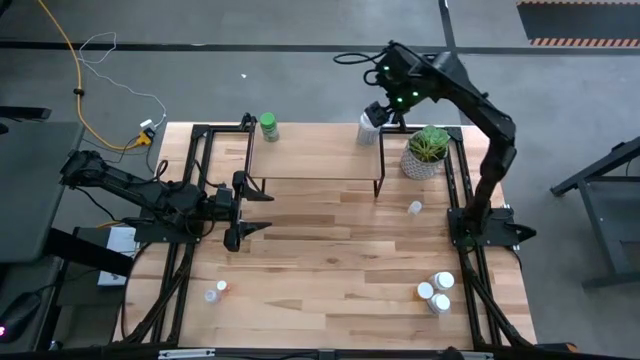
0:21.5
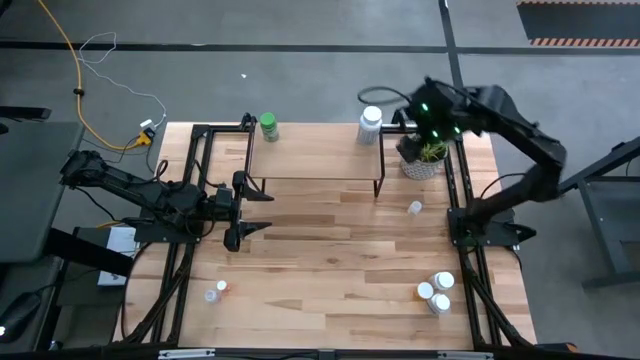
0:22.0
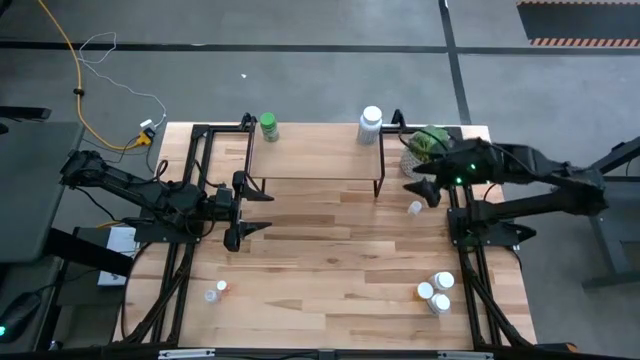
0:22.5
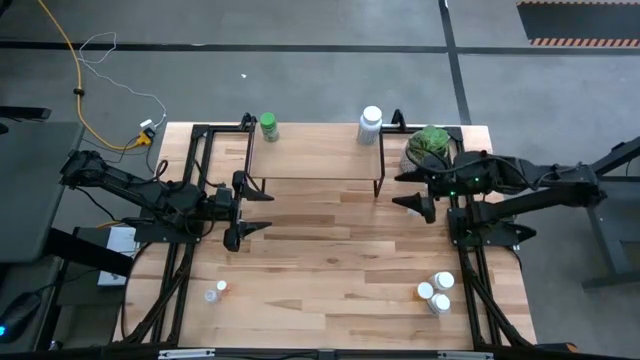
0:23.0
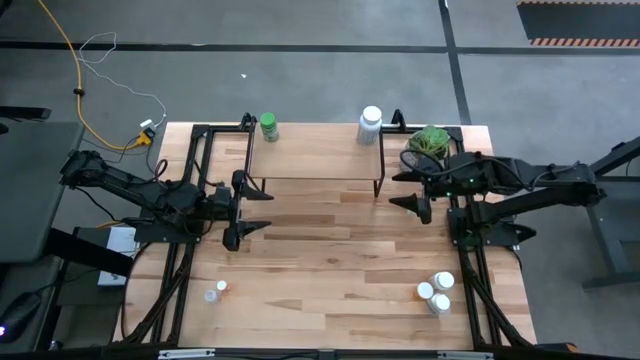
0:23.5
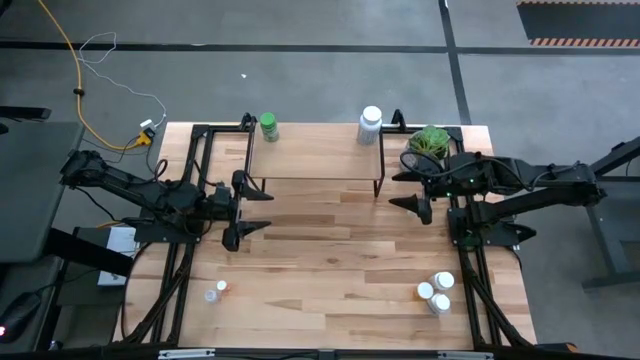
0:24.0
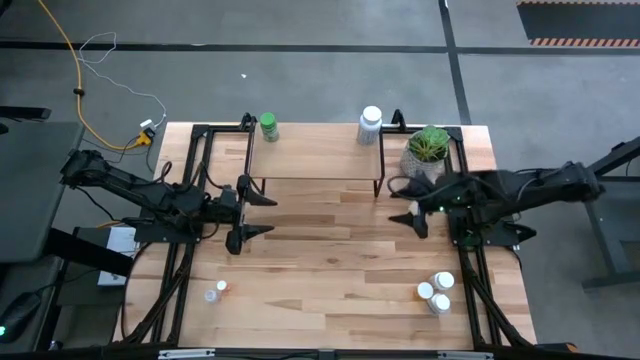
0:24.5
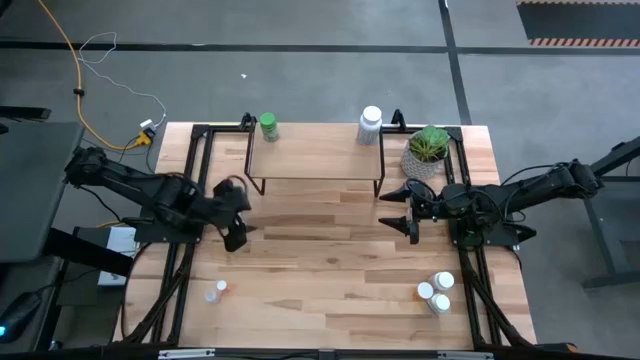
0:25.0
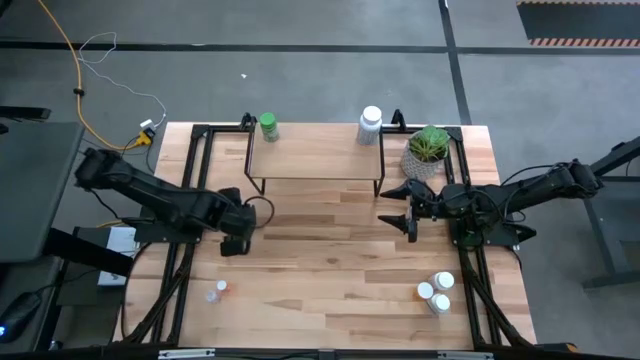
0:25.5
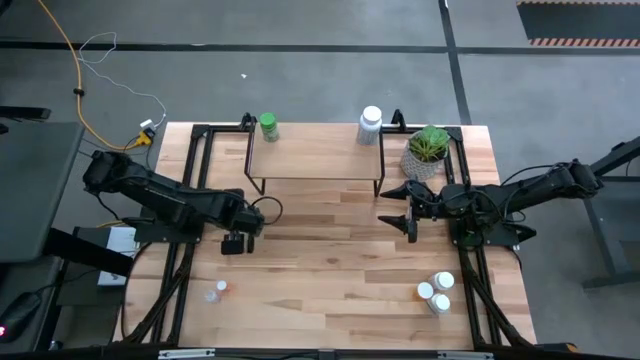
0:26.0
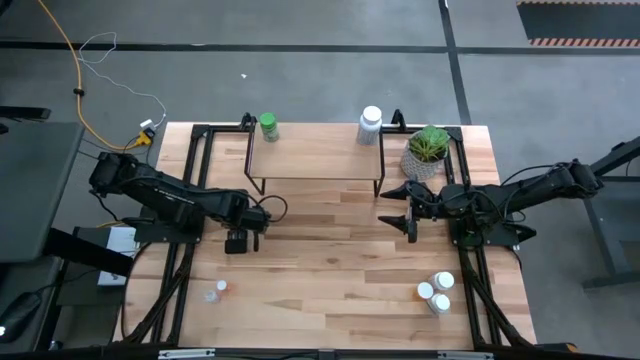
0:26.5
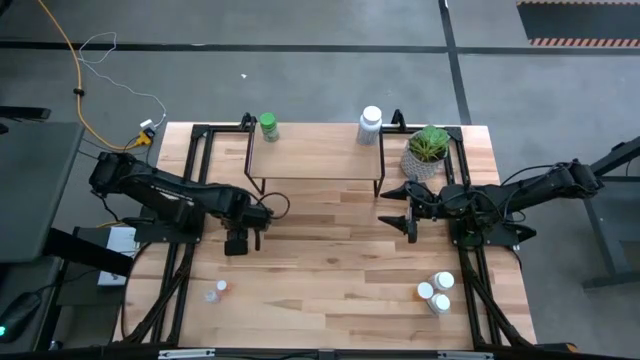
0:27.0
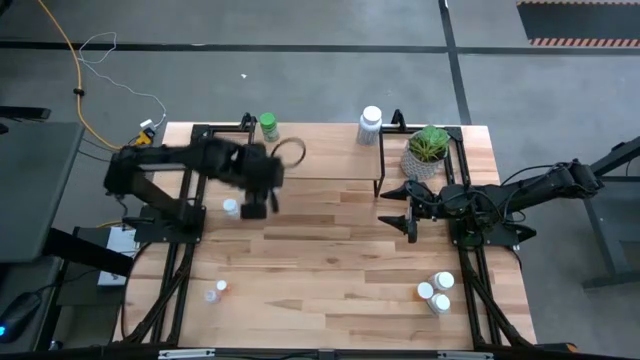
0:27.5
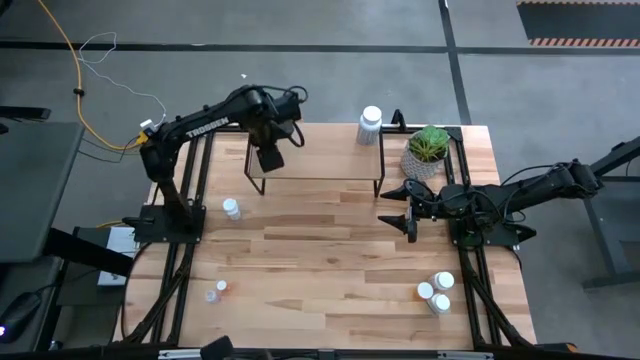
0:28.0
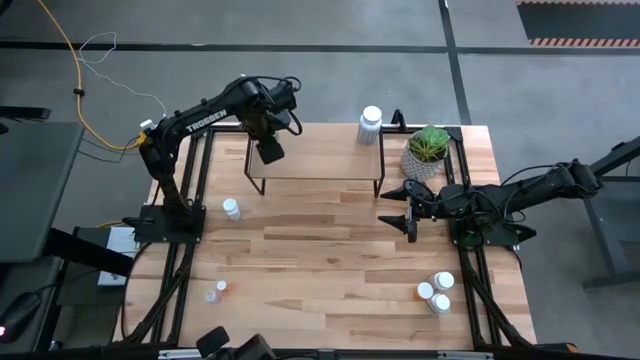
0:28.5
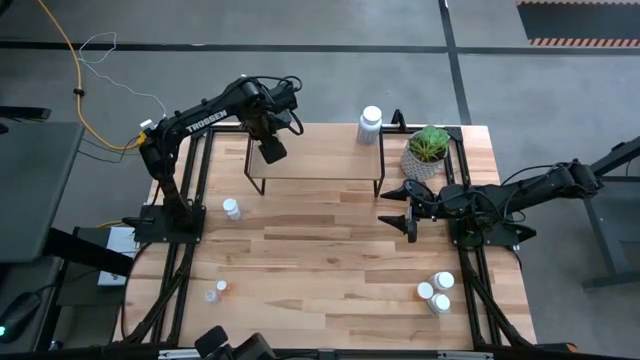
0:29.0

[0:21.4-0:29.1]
Task: Pick and place medicine bottles onto shelf by color
Put the top left transparent bottle on the shelf

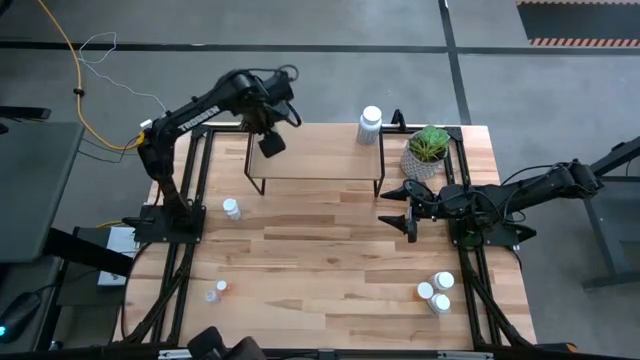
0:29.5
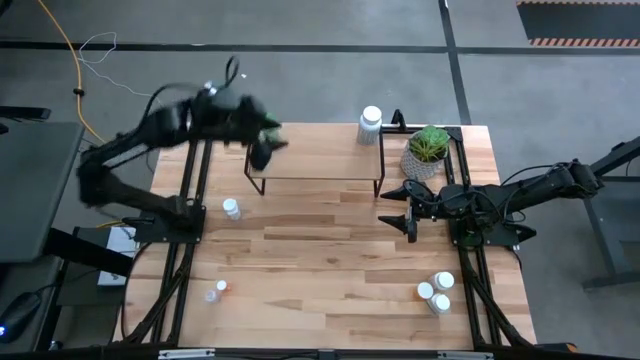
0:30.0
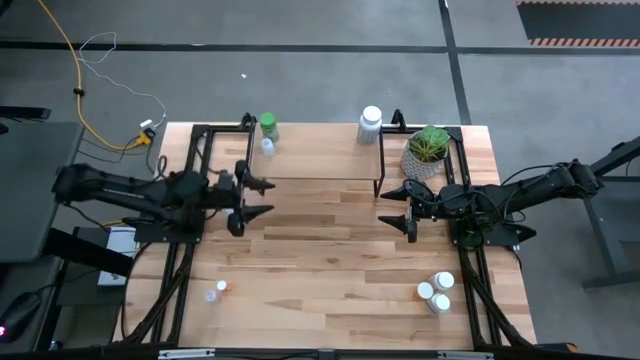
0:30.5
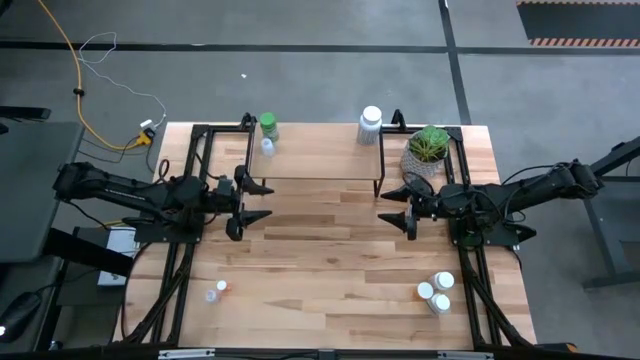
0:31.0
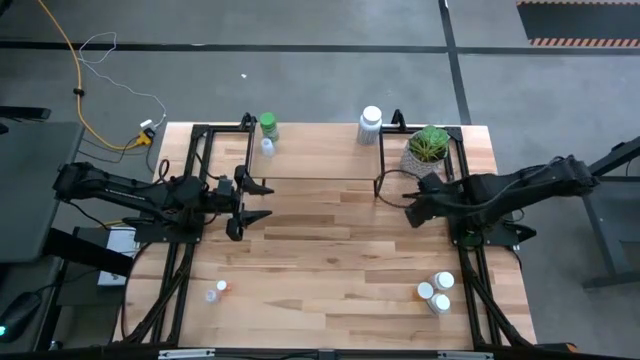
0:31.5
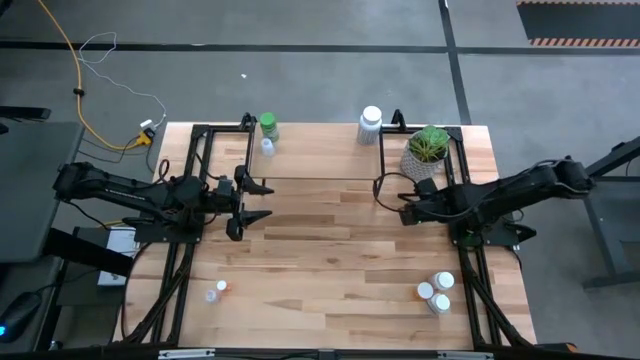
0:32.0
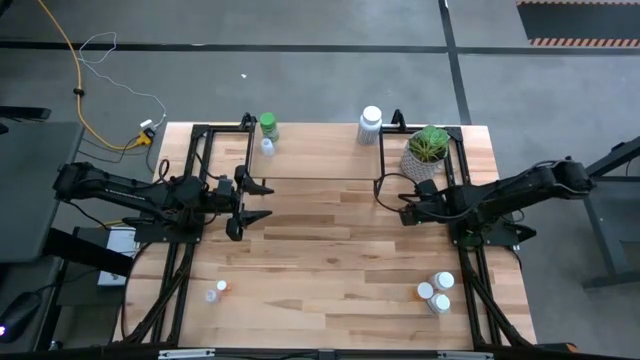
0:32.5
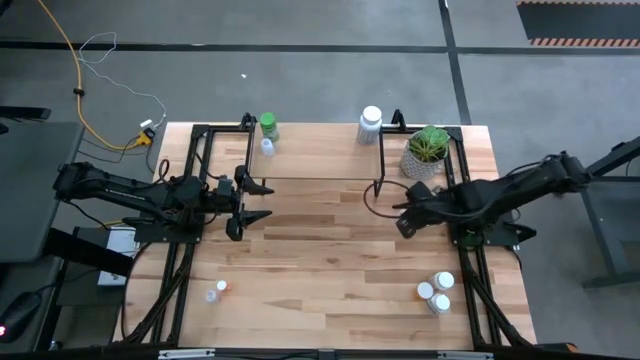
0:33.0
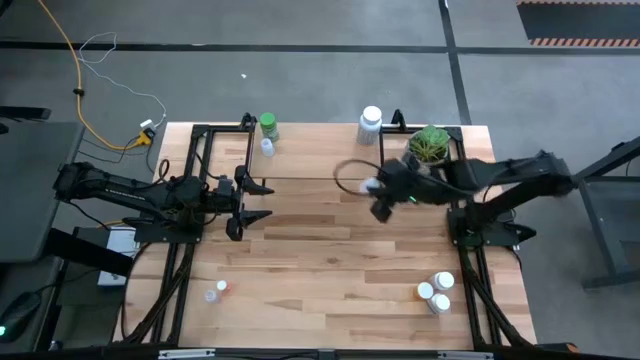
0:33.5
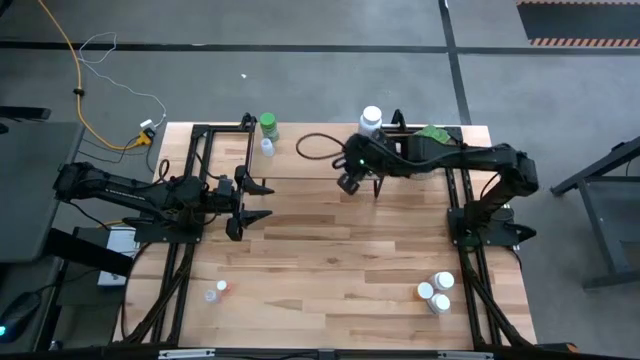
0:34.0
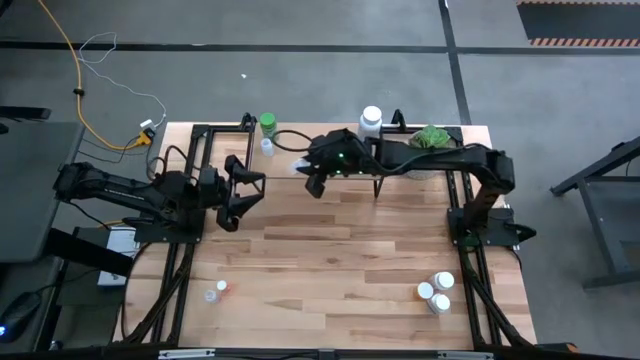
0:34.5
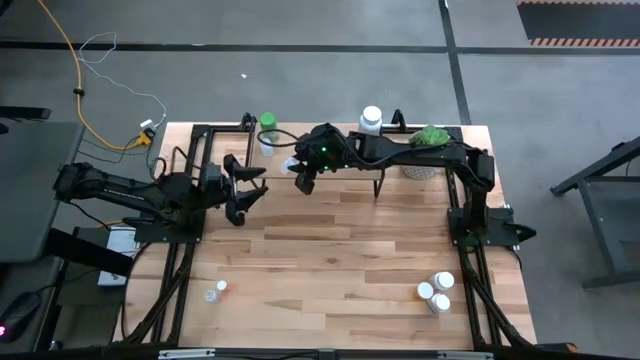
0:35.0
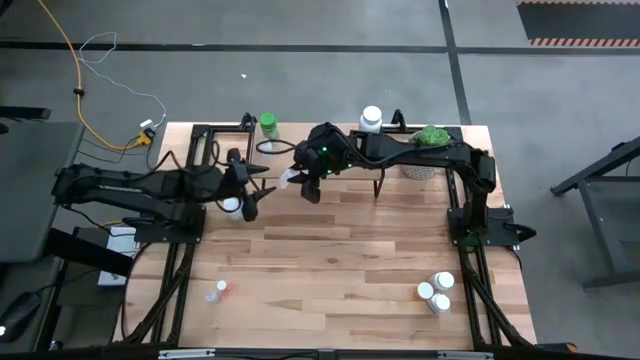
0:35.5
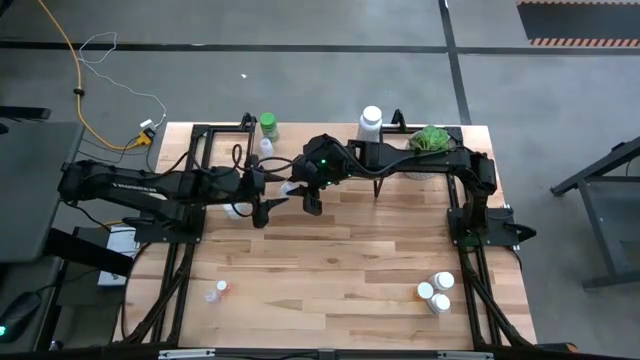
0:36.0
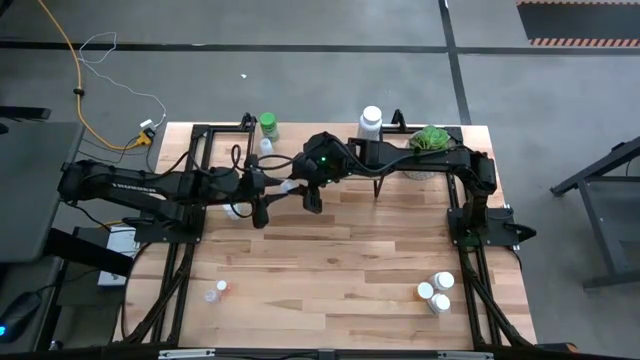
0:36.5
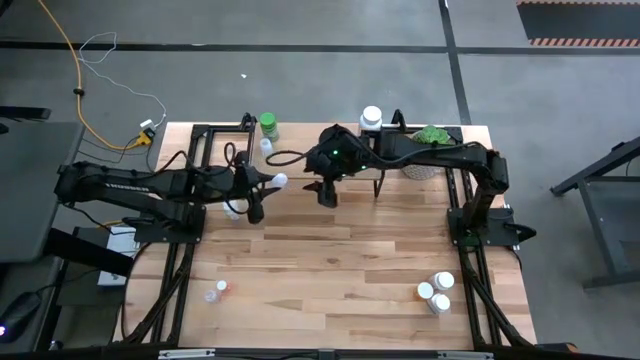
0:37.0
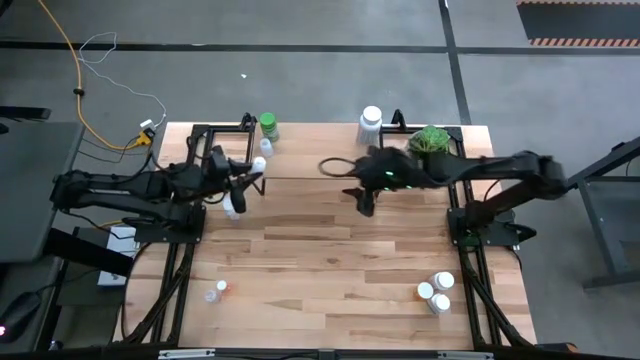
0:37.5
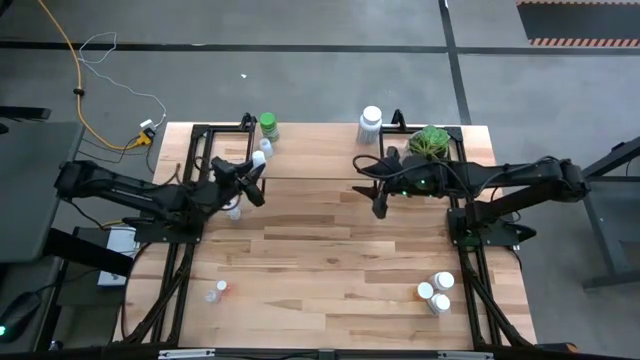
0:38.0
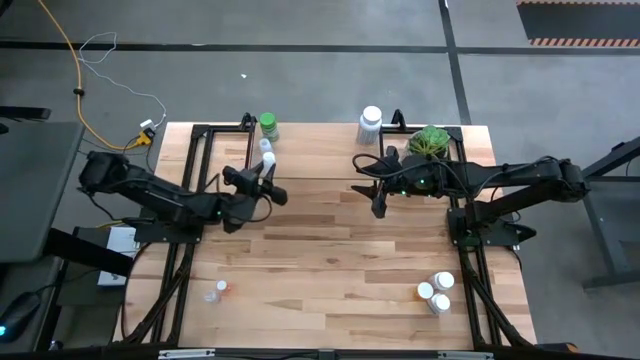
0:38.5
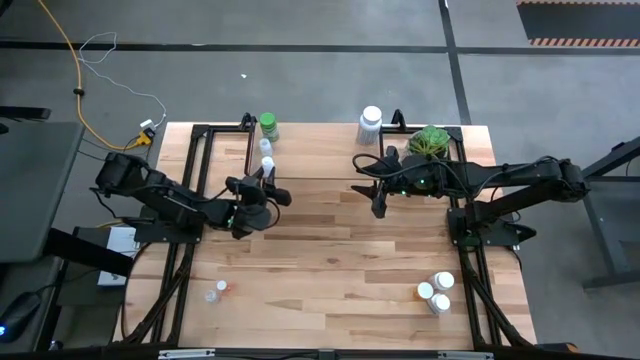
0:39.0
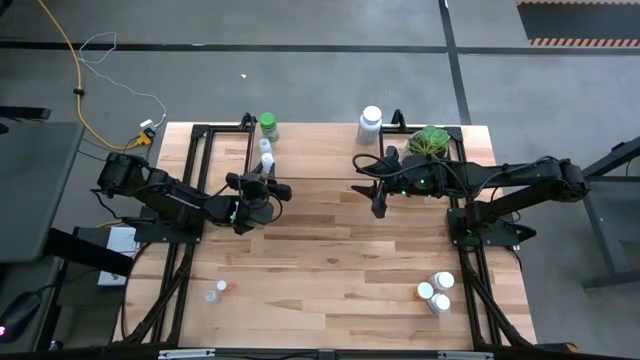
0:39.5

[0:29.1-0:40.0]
Put the top transparent bottle on the shelf

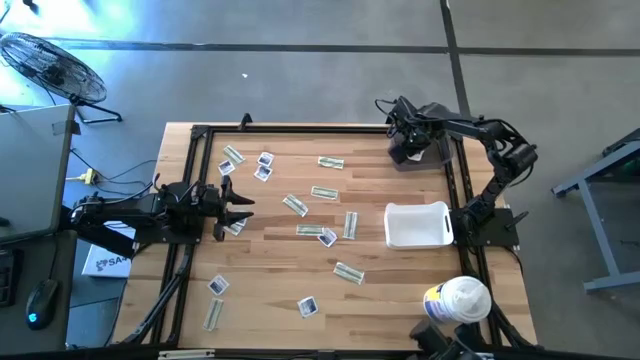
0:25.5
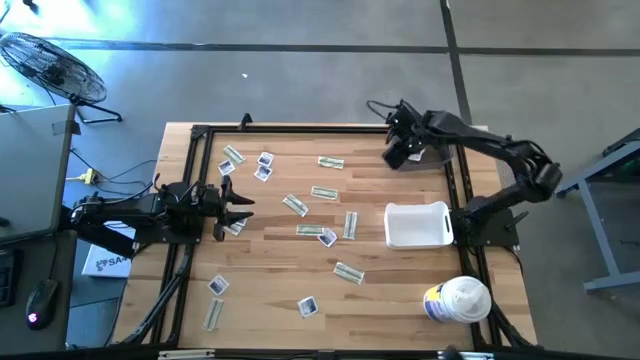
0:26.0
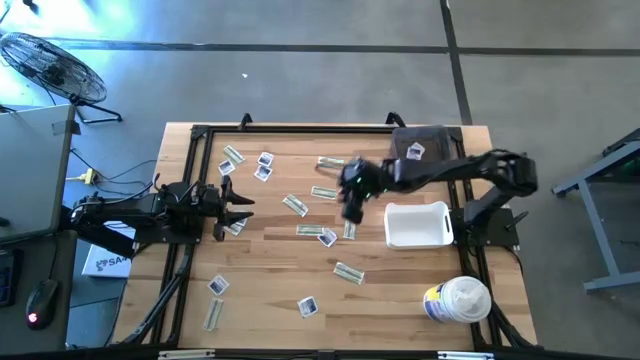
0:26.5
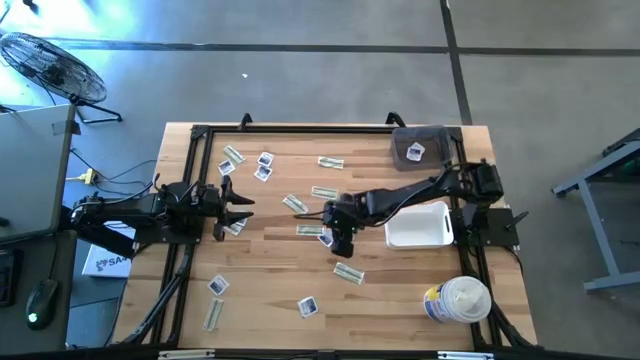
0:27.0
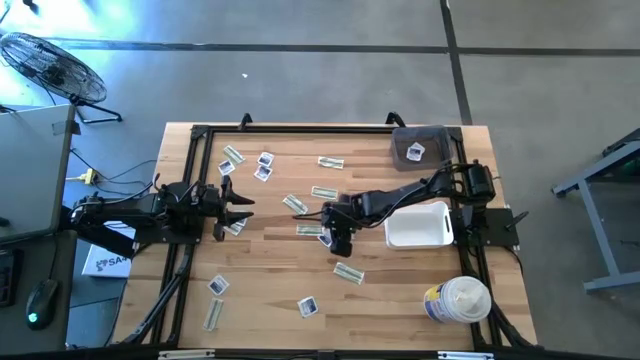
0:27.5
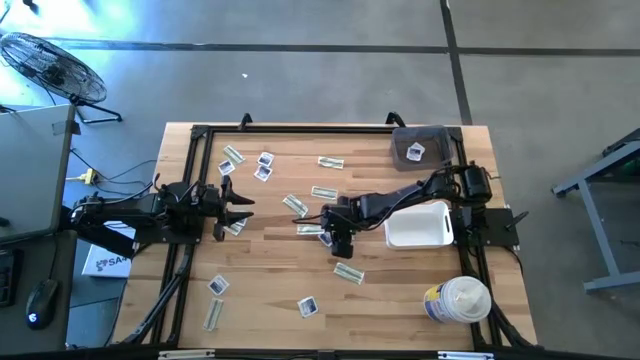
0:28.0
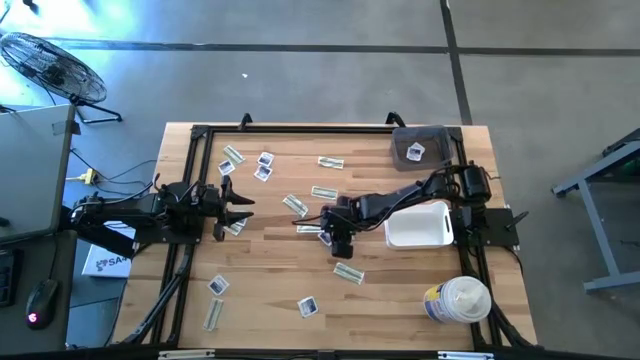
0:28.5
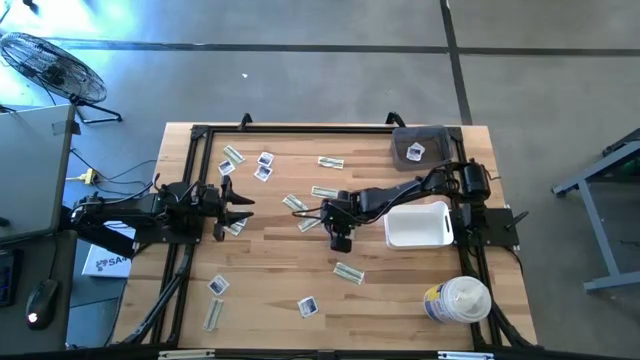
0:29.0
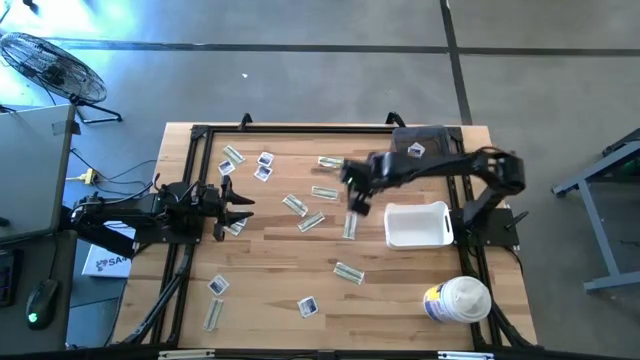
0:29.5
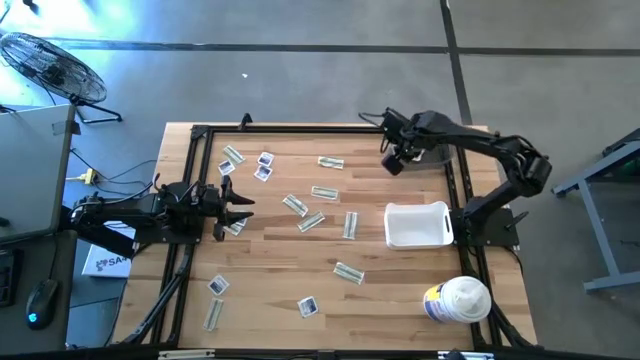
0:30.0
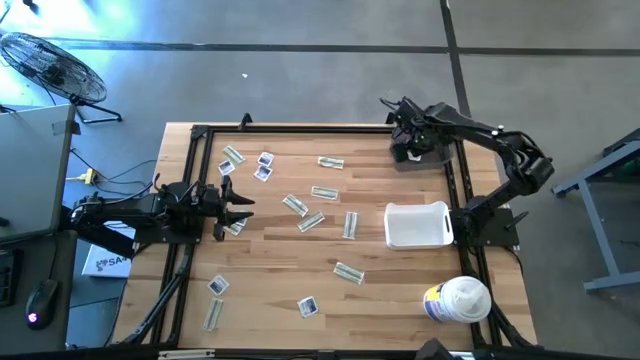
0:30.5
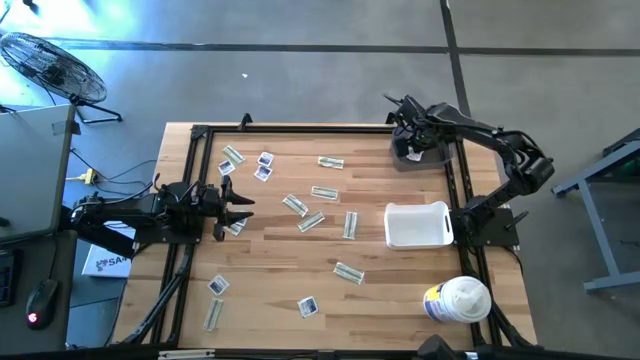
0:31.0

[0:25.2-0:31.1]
Task: Pick & Place First Aid Supplies
Put the alcohol pad into the black bin
